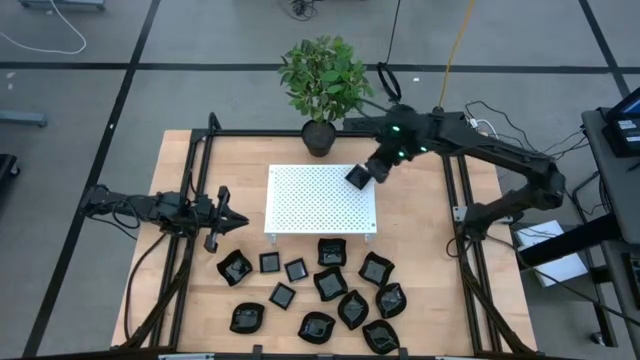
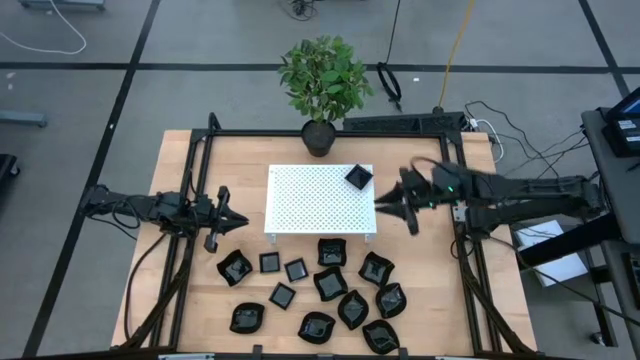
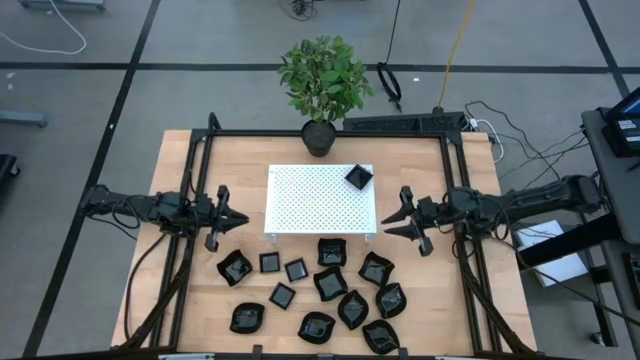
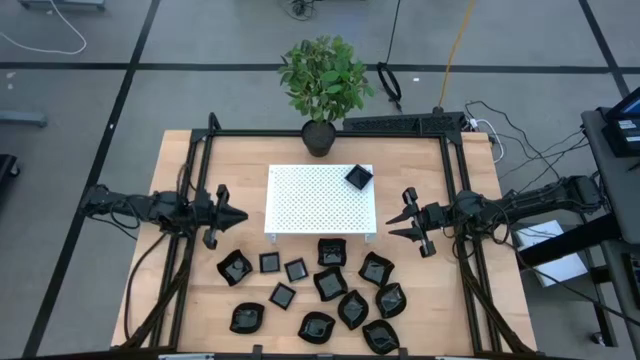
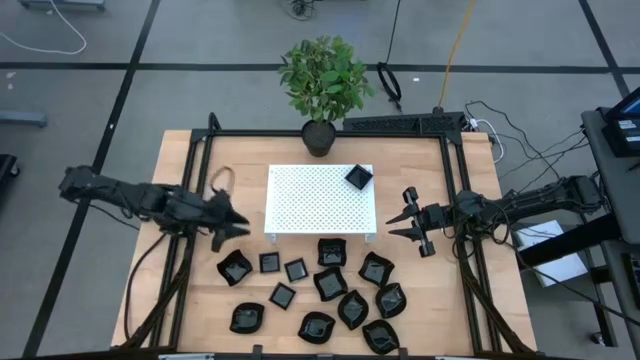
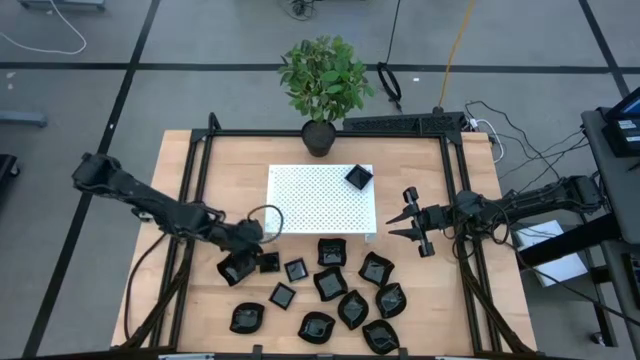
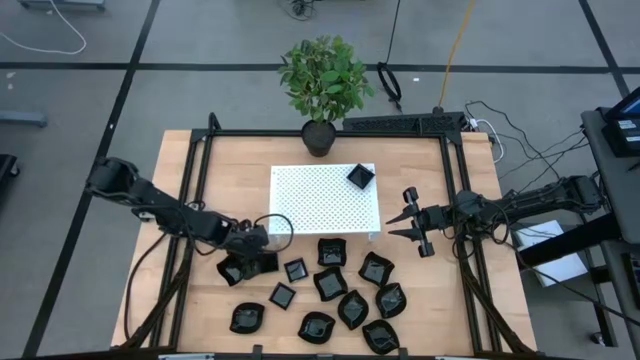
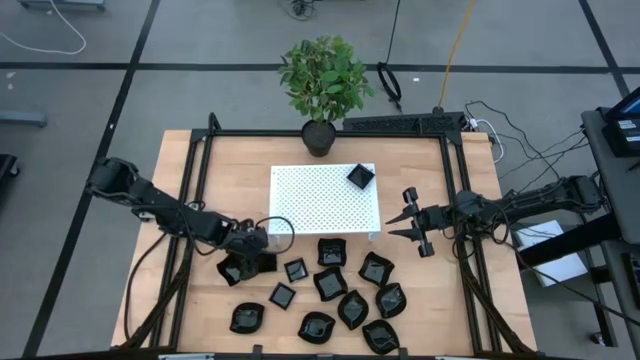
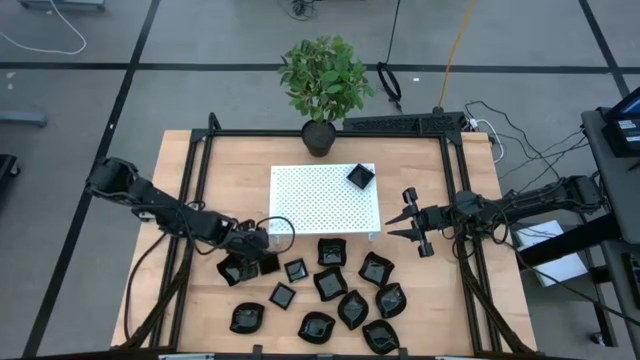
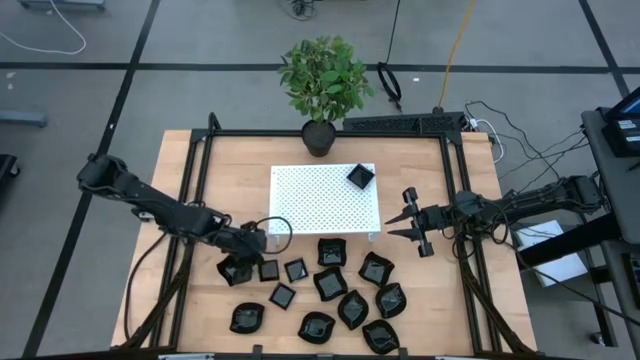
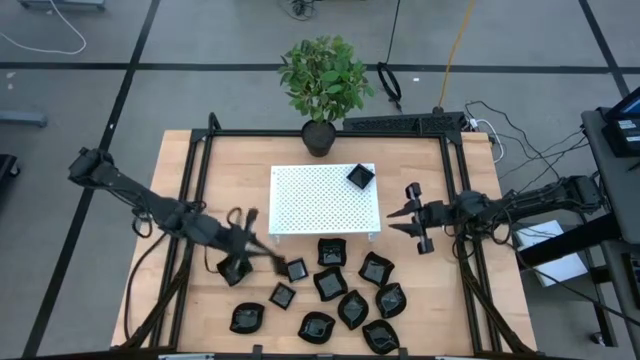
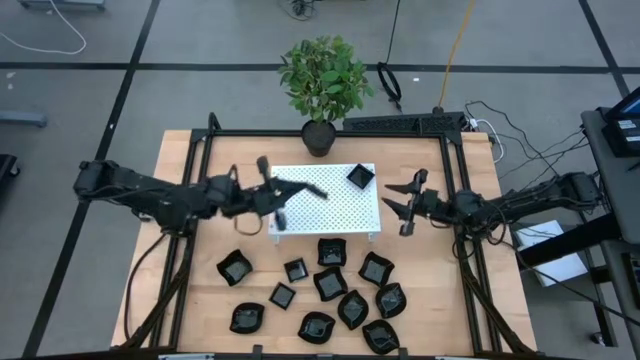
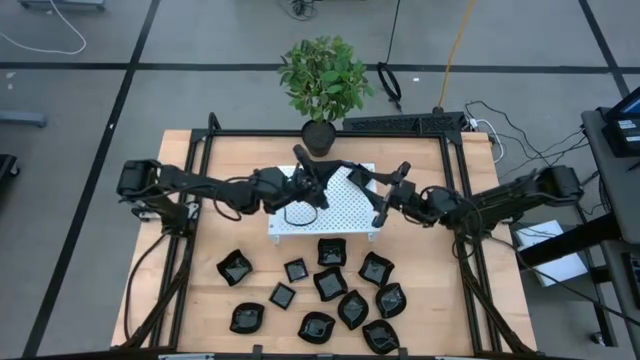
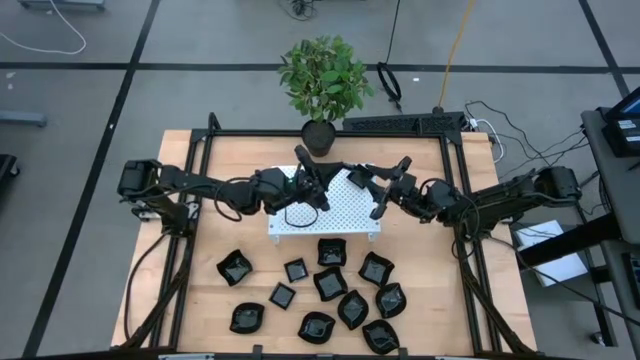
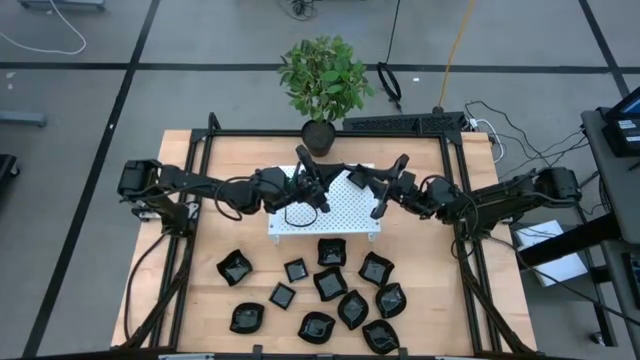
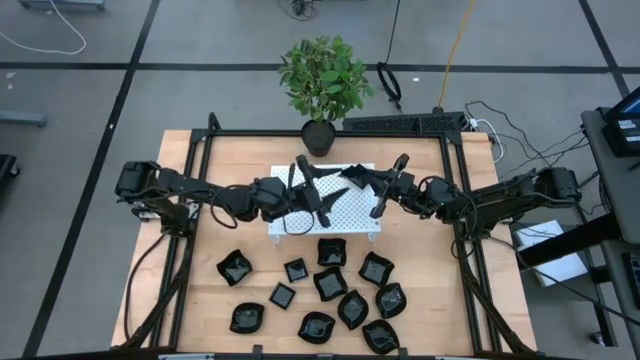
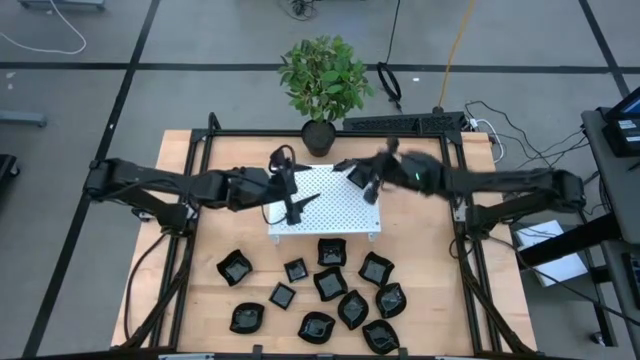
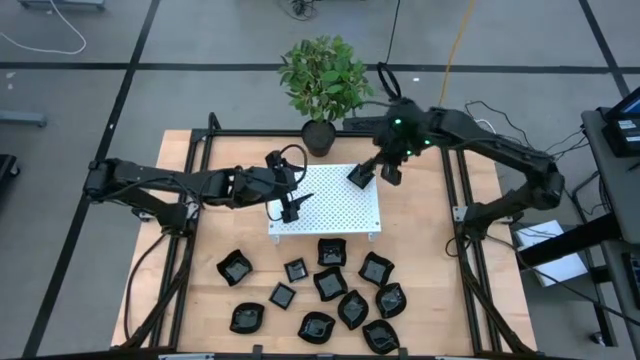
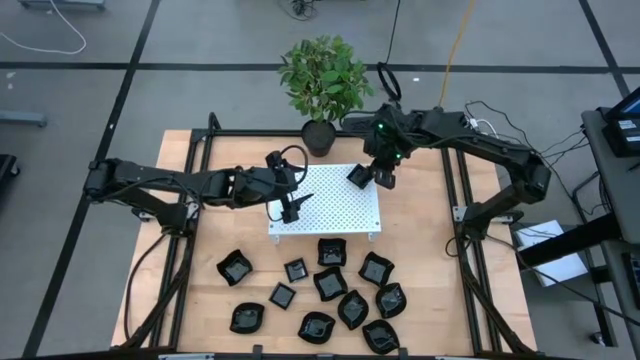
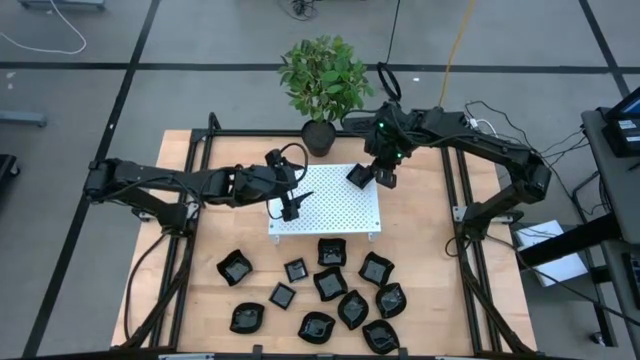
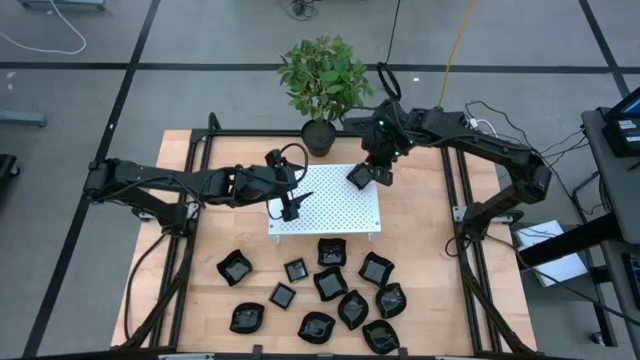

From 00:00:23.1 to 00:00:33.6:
Task: Pick & Place Mini shaped plates
Stack the black square plate on top of the black square plate on the shelf

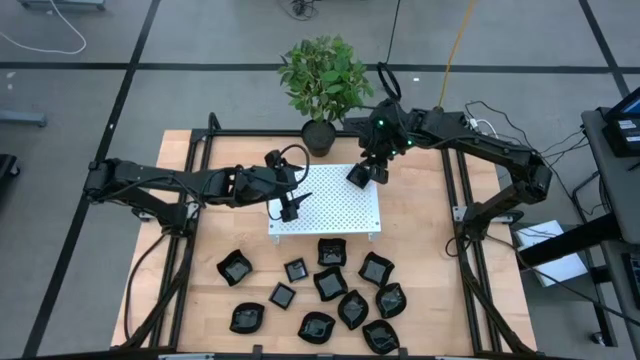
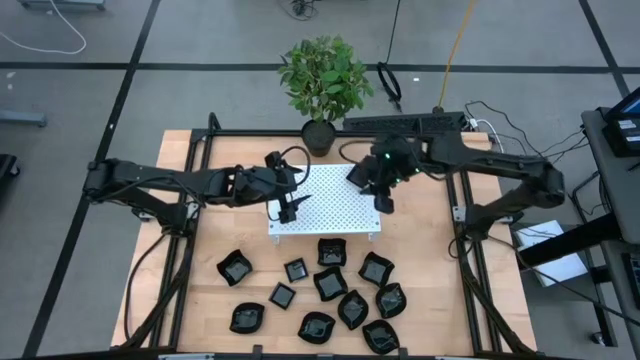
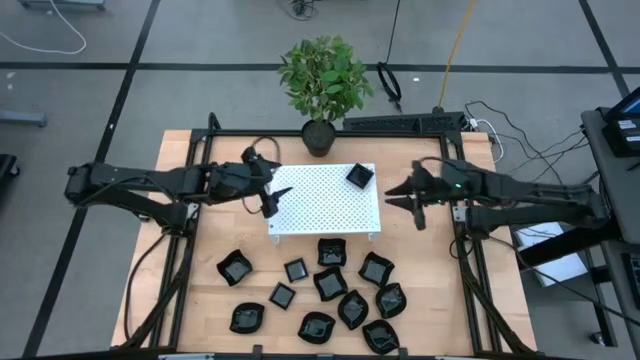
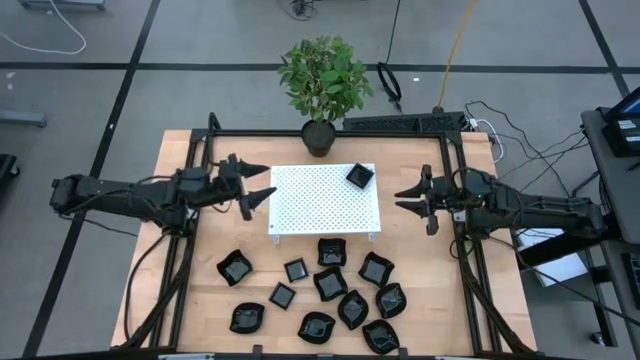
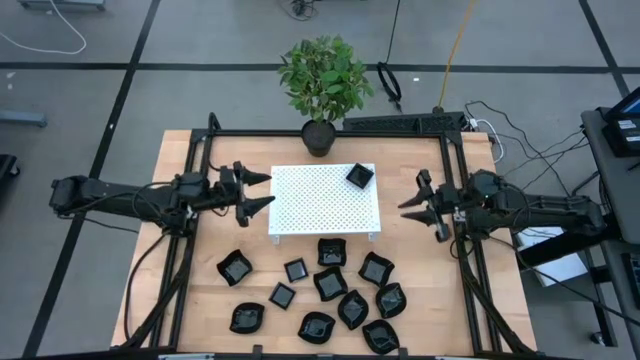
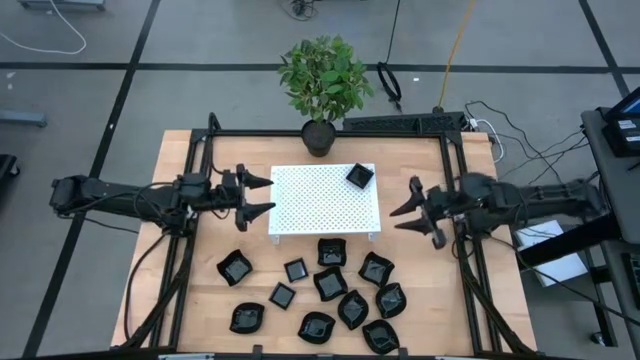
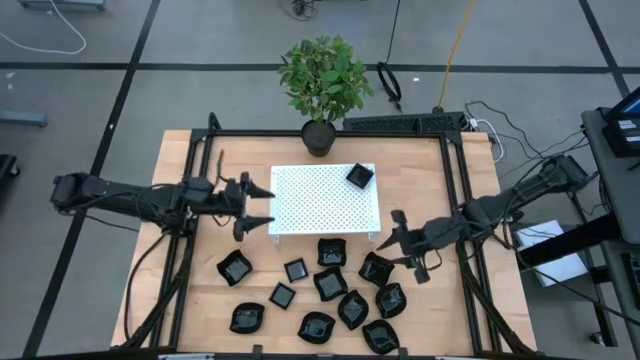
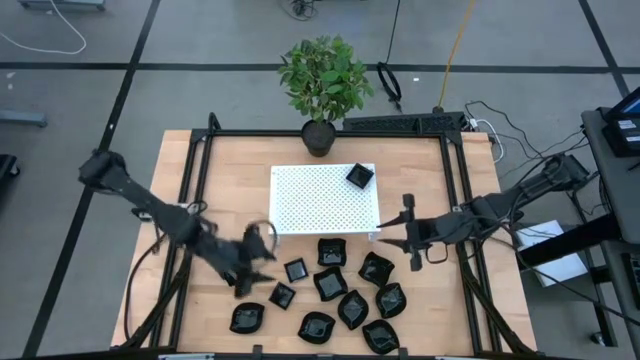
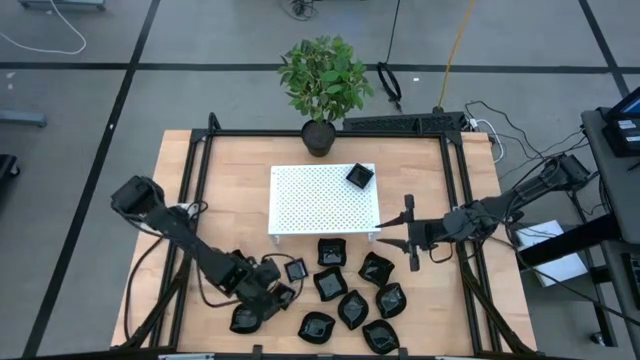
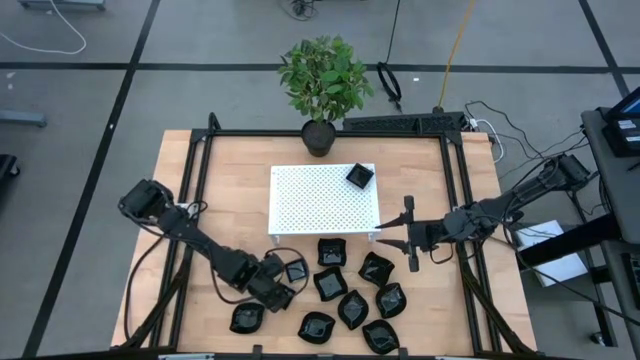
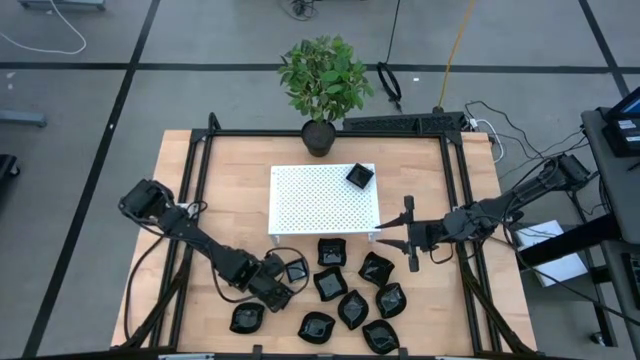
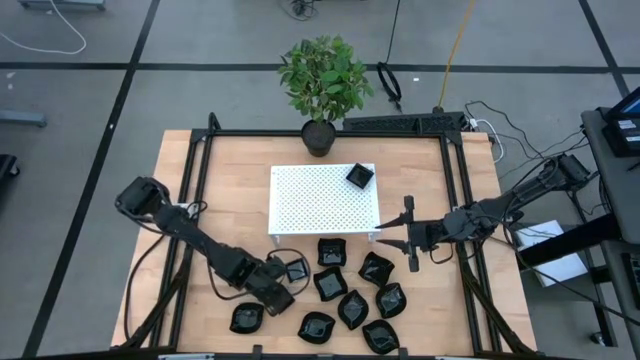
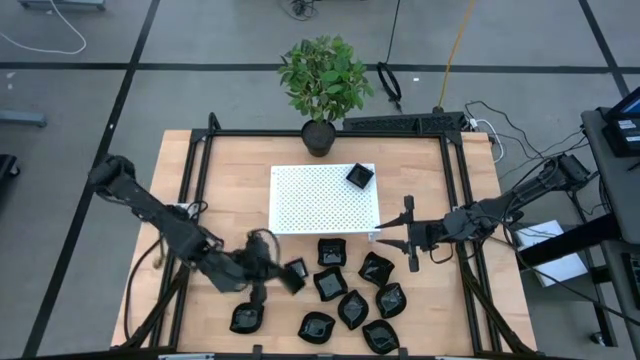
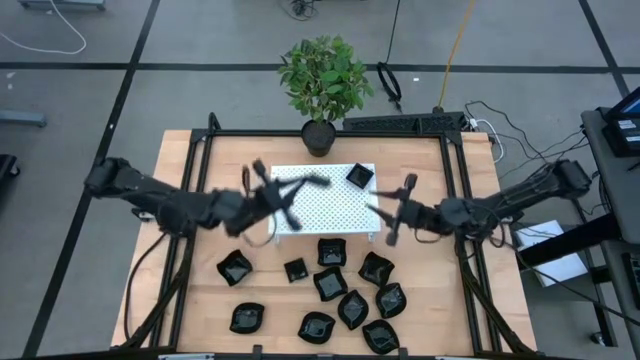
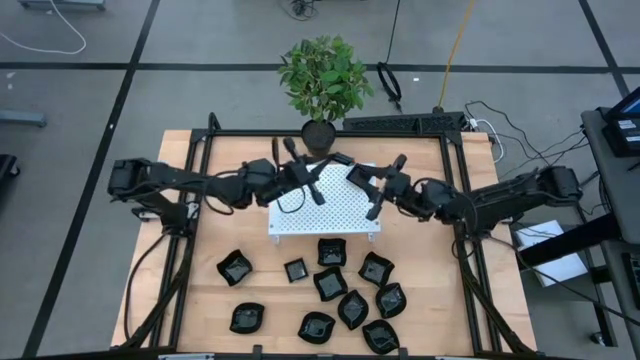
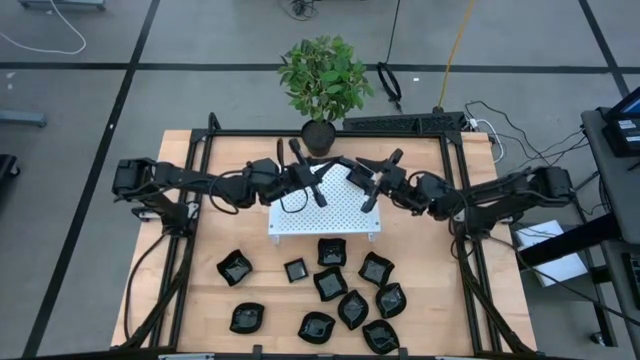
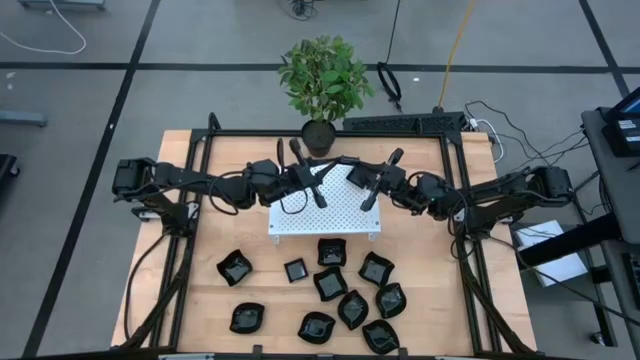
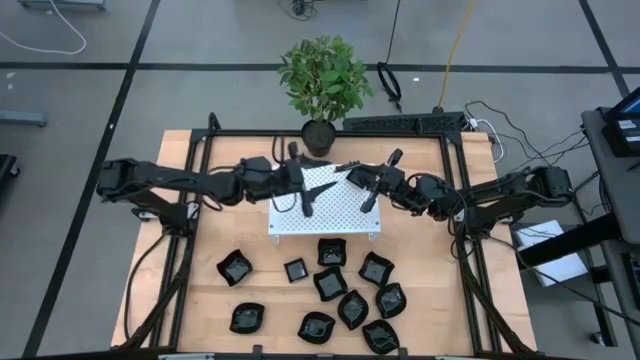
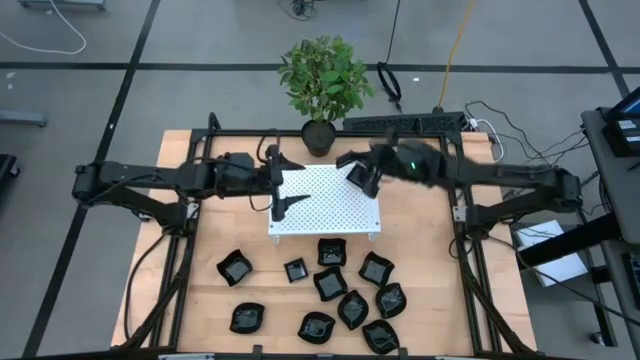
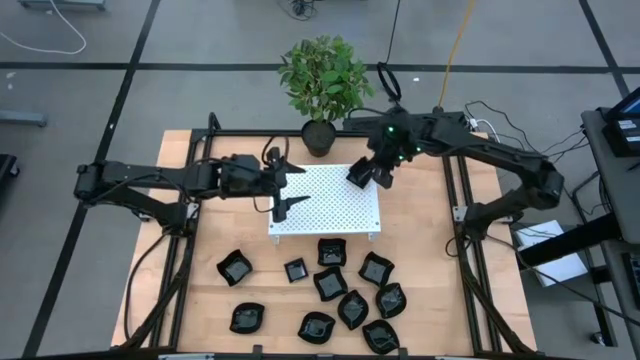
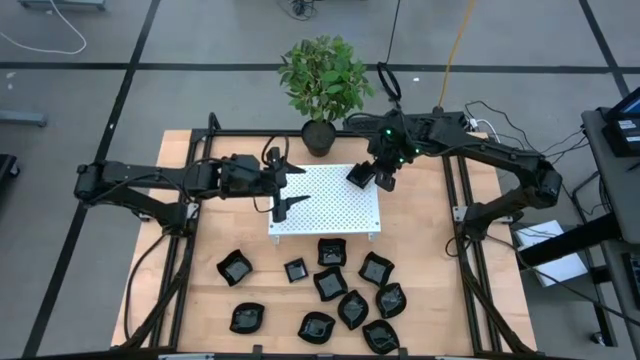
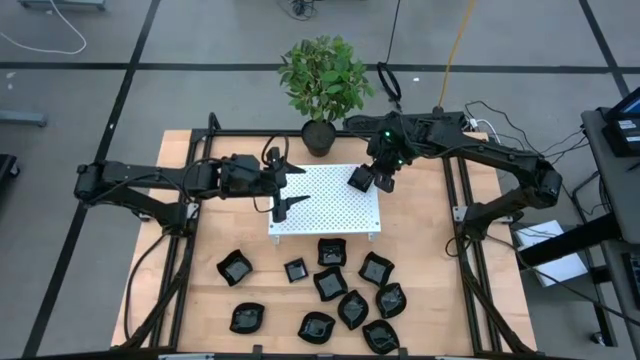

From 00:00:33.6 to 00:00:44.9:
Stack the black square plate on top of the black square plate on the shelf
